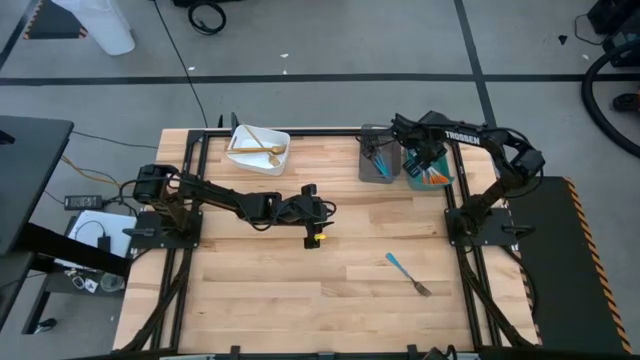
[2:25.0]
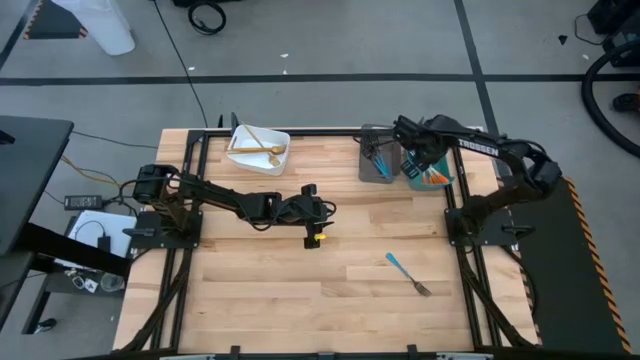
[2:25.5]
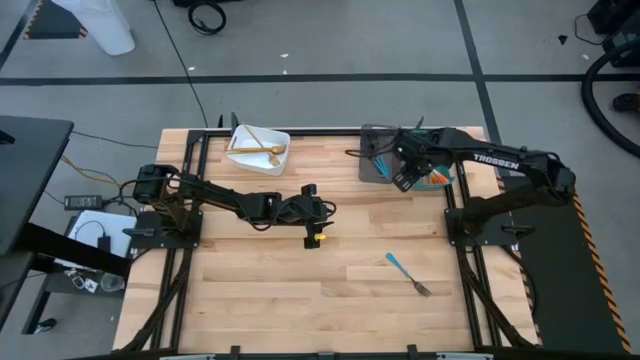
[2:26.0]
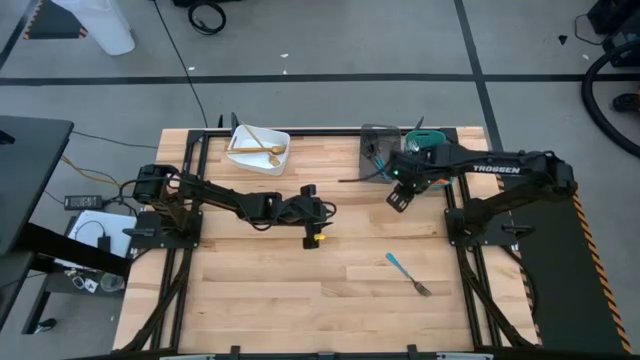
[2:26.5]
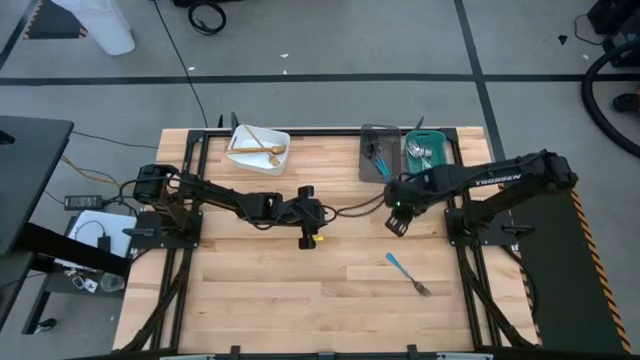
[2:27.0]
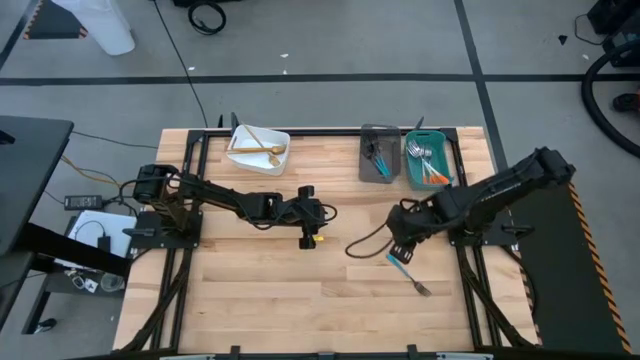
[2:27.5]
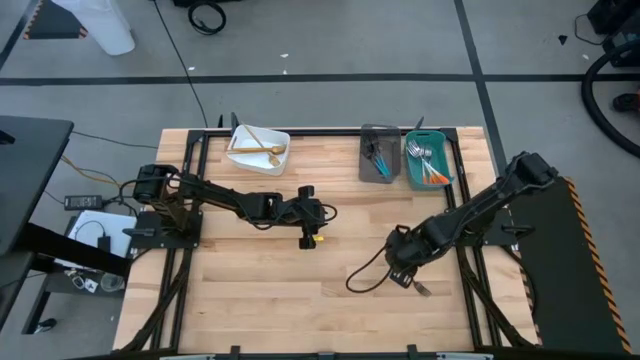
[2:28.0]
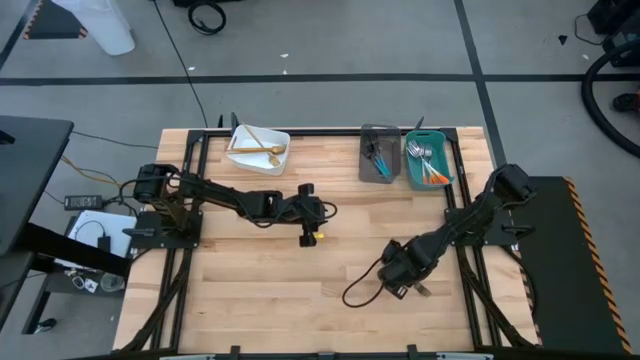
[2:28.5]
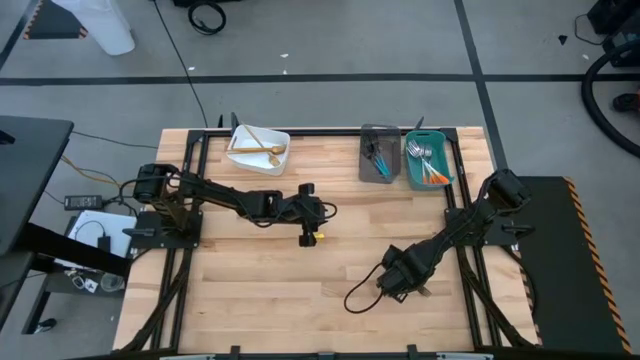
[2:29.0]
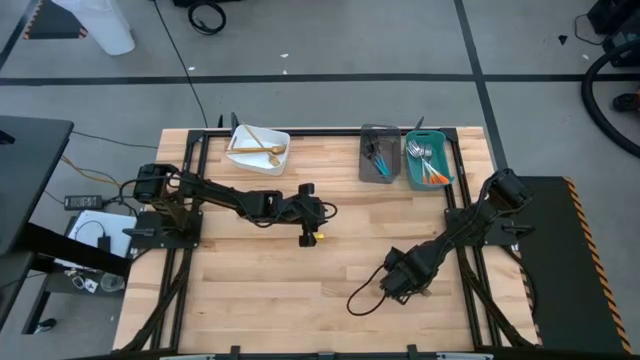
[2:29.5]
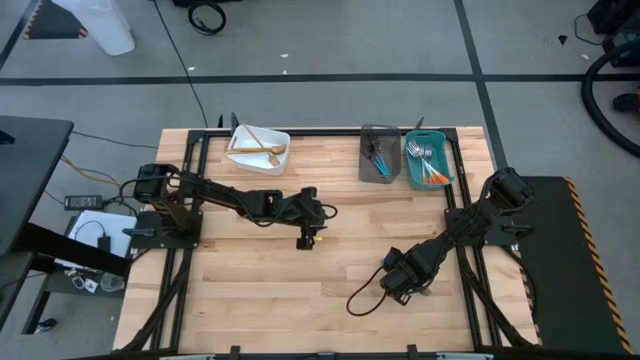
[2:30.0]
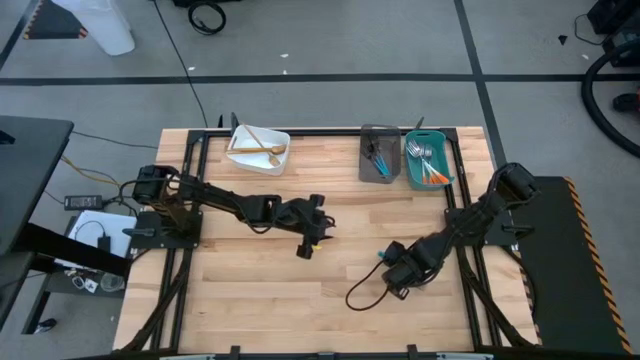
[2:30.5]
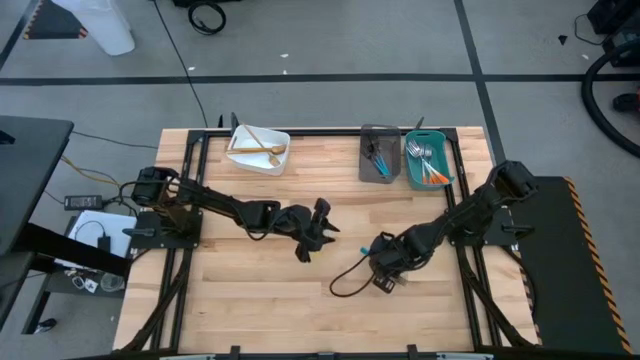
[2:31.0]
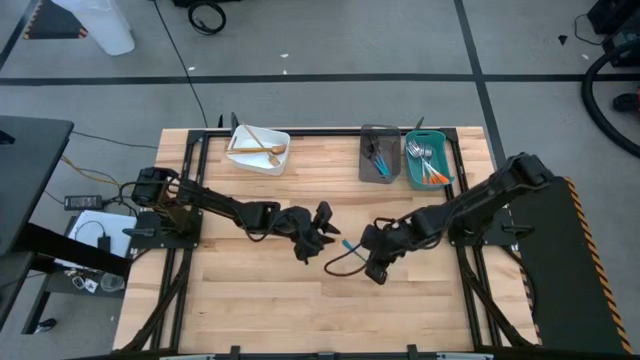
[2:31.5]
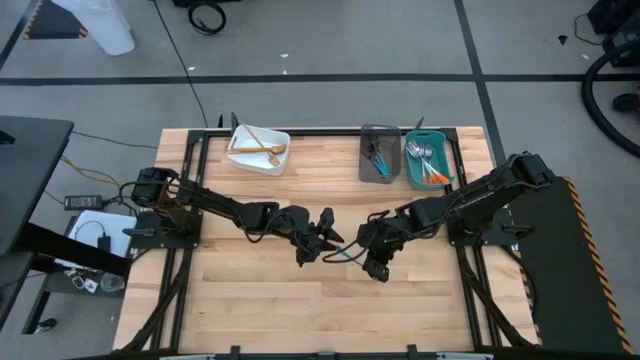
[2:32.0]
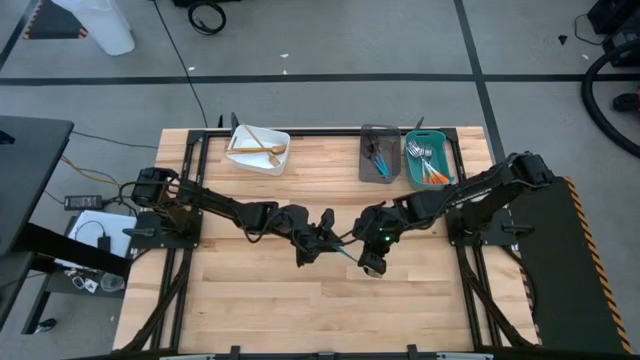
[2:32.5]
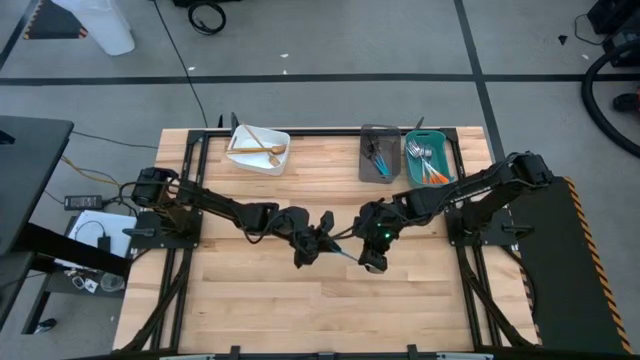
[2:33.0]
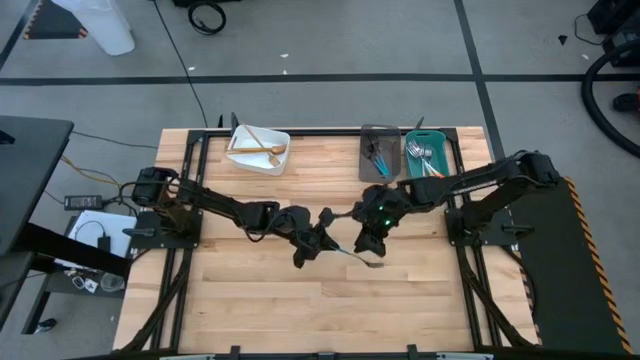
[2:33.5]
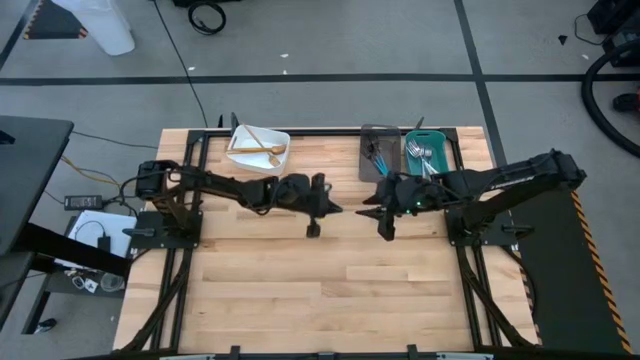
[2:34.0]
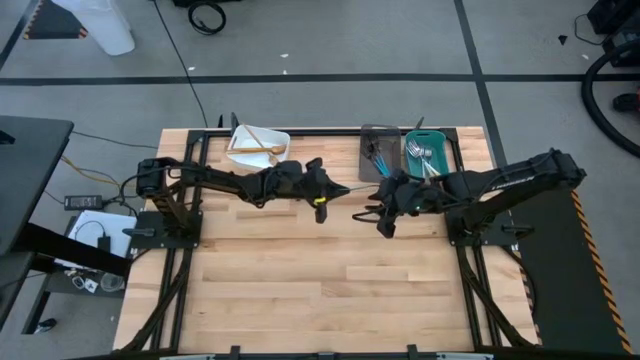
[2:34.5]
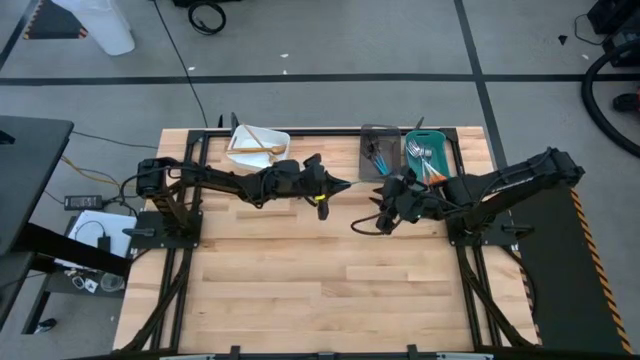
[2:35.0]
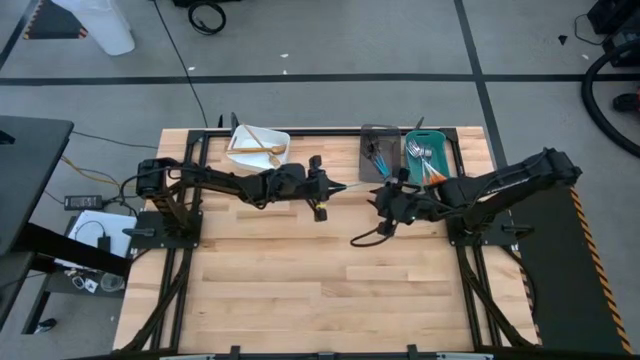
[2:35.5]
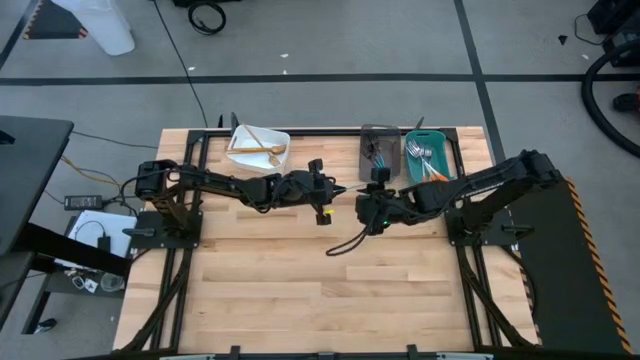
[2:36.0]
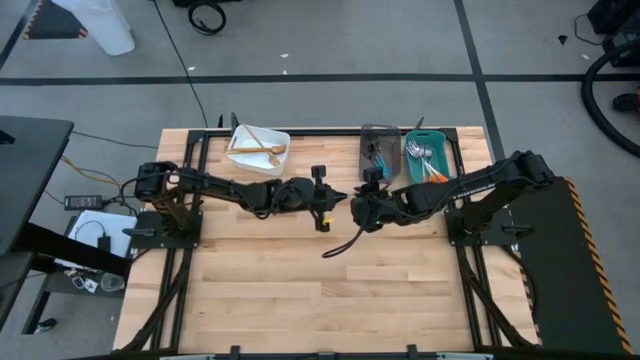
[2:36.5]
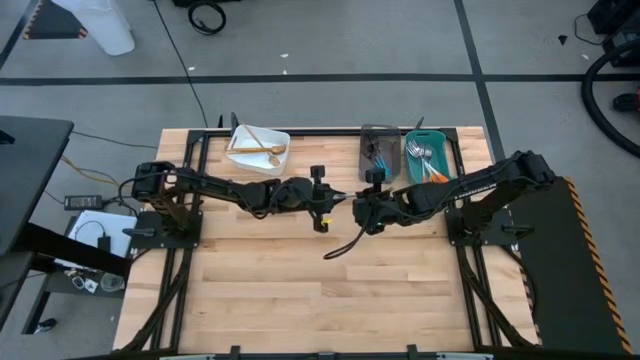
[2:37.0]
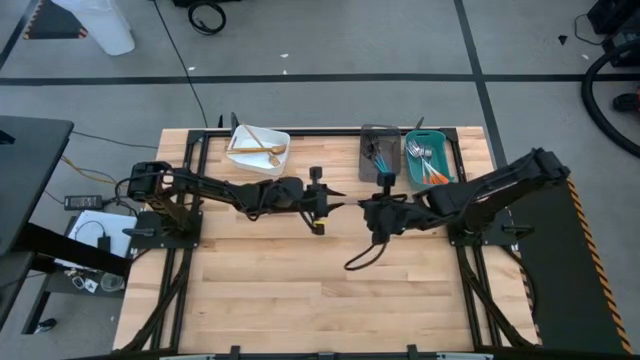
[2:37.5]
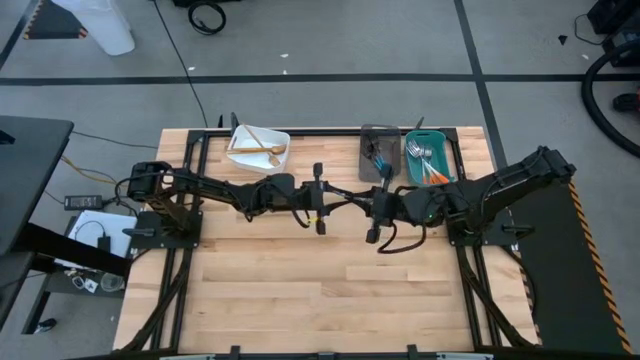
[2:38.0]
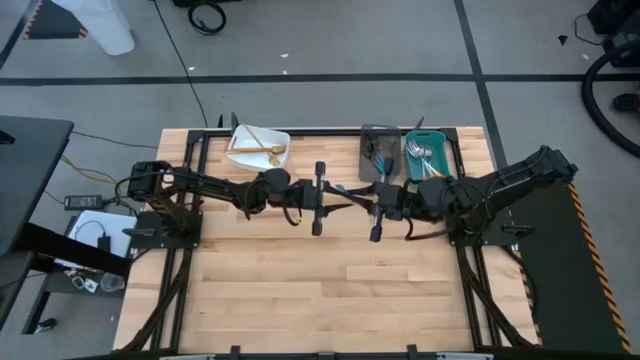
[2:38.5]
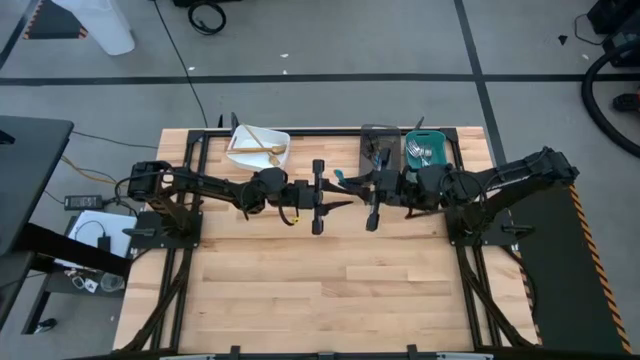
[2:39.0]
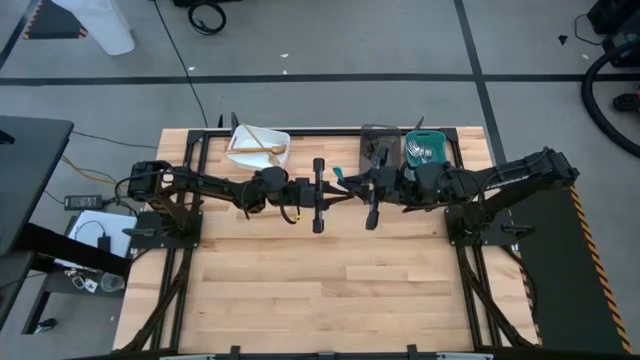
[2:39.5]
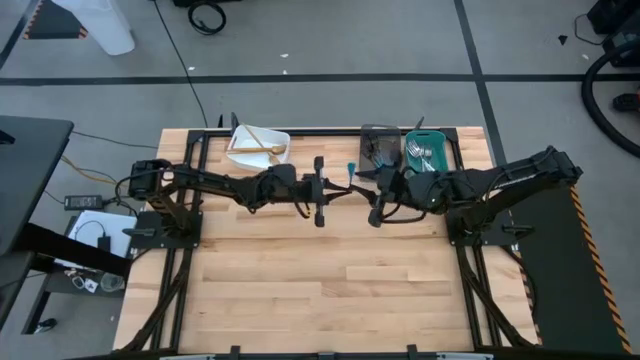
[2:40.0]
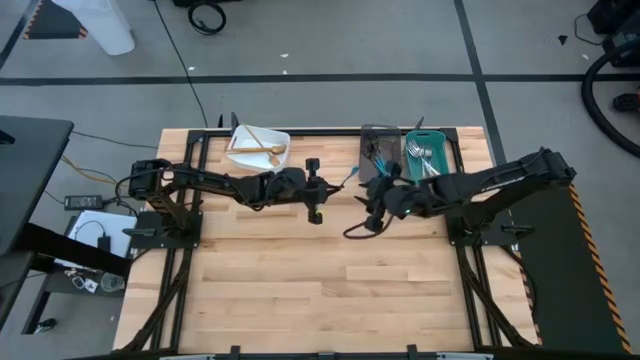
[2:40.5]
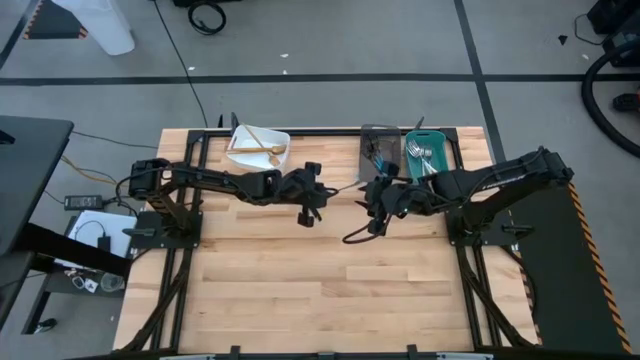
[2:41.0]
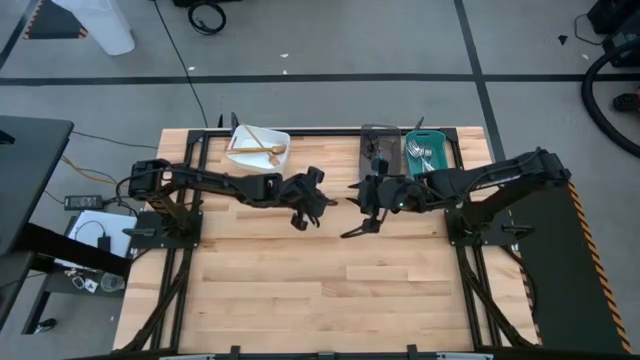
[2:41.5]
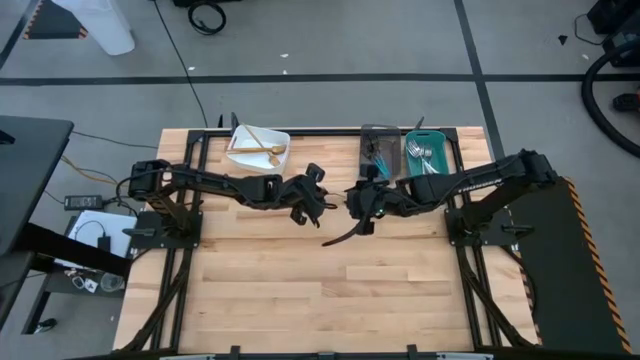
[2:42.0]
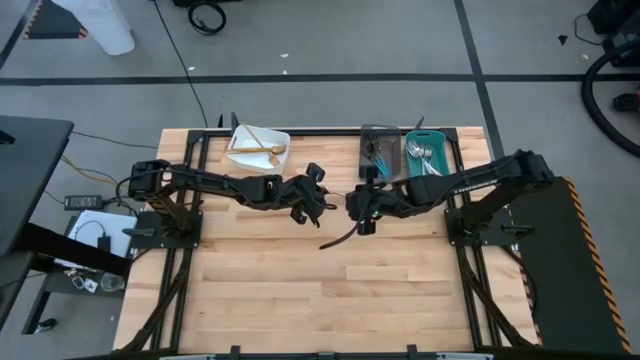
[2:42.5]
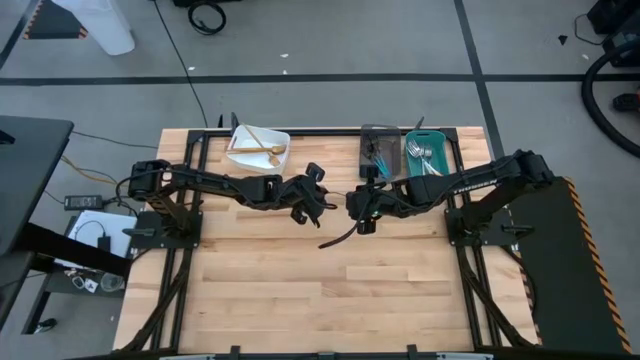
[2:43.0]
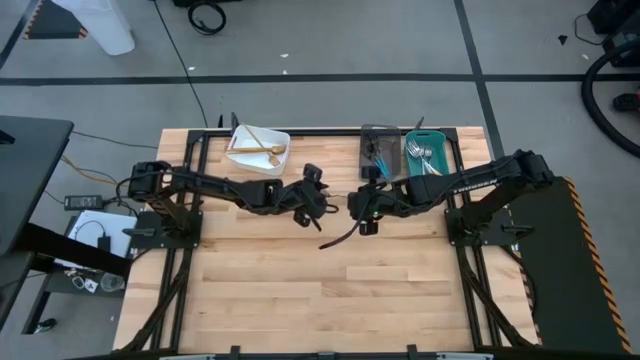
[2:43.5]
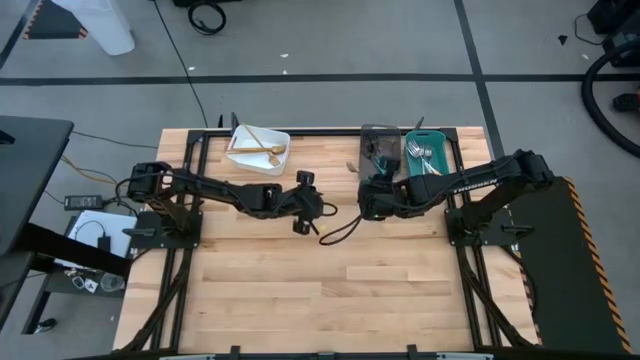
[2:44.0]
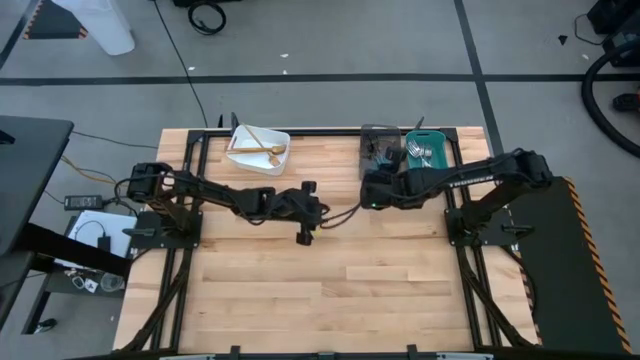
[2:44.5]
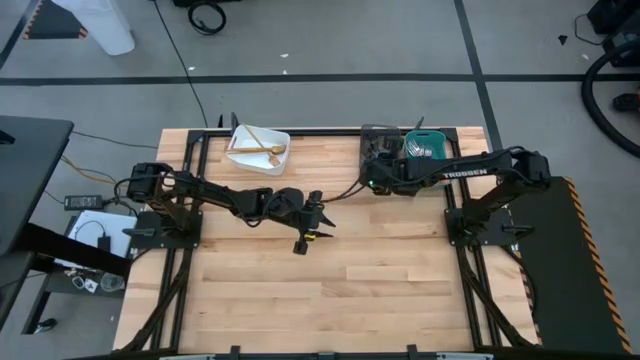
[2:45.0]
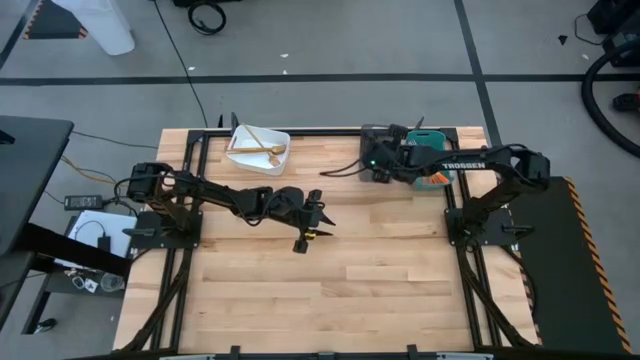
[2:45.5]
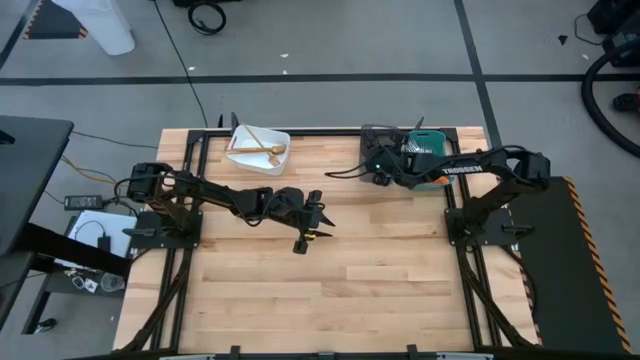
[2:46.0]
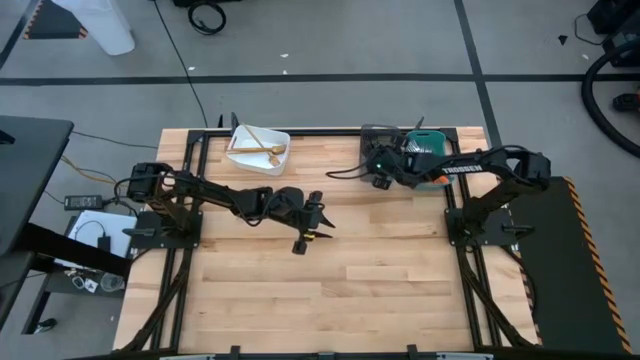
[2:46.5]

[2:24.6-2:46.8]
Task: Sort silverware by color (type)
Put the blue fork into the black bin

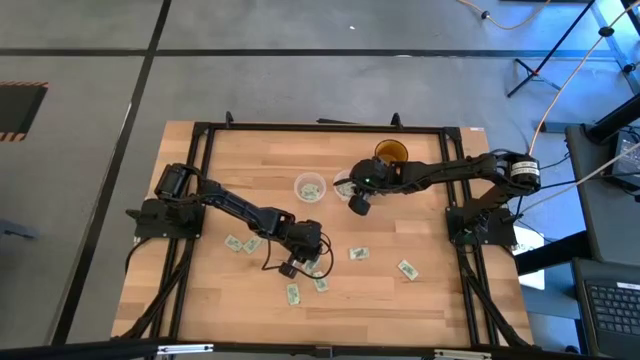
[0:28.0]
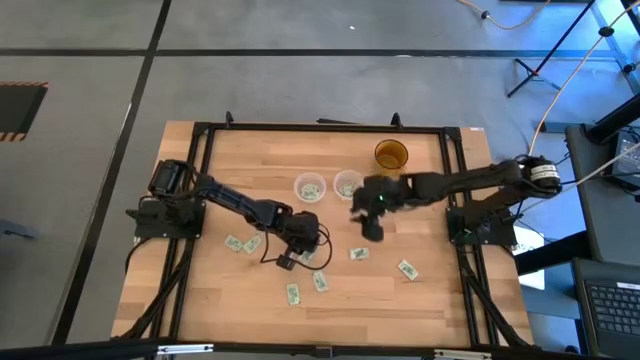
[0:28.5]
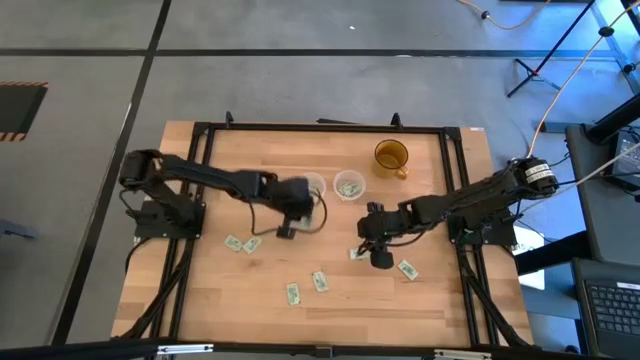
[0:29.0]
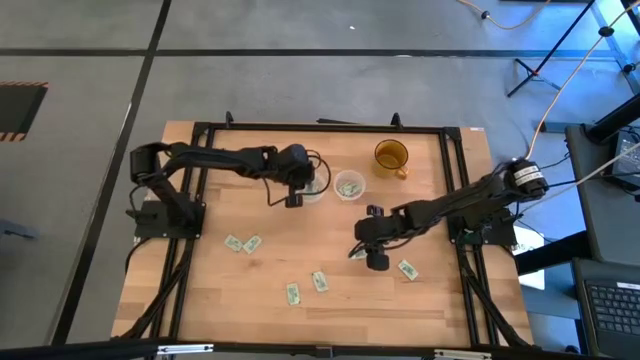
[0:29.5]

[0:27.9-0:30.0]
Task: Pick and place Stevia / Truvia into bins
Put the stevia packet into the left transparent container
